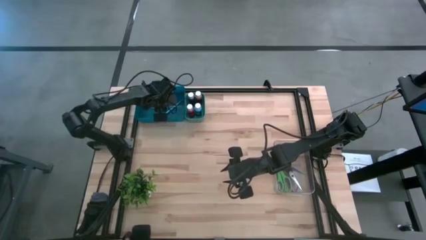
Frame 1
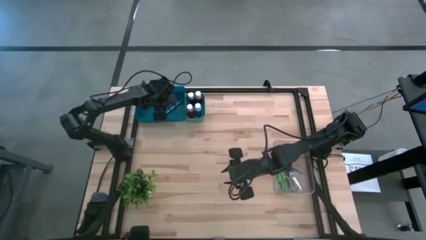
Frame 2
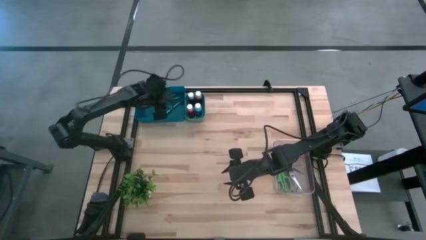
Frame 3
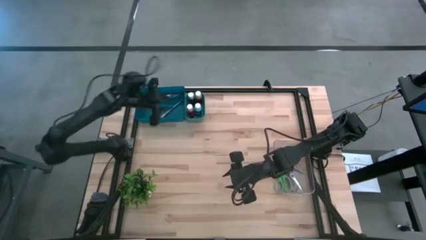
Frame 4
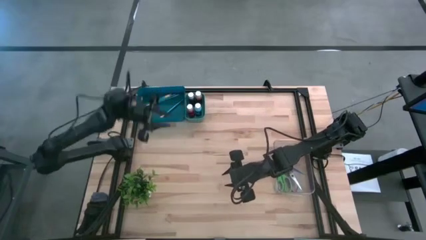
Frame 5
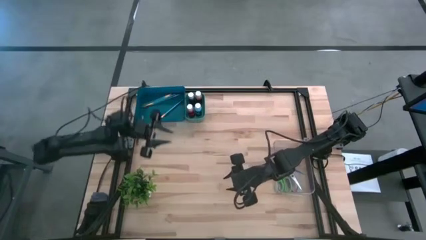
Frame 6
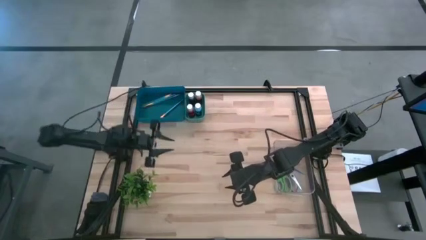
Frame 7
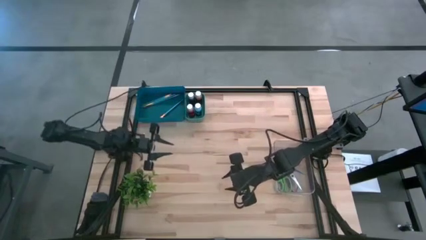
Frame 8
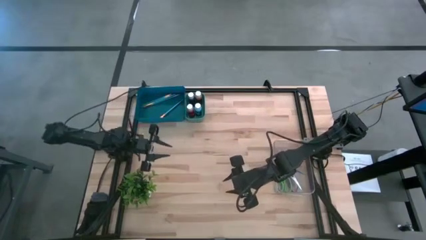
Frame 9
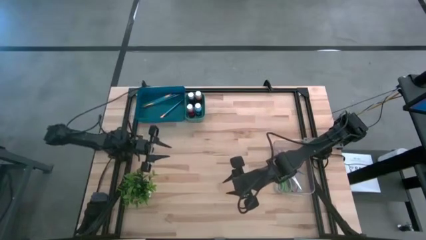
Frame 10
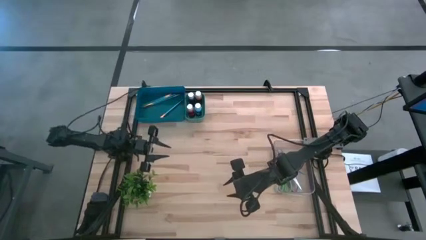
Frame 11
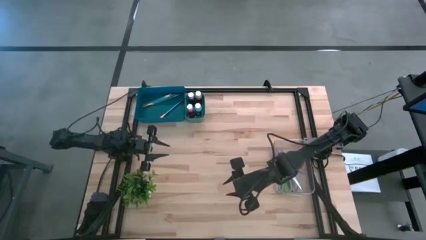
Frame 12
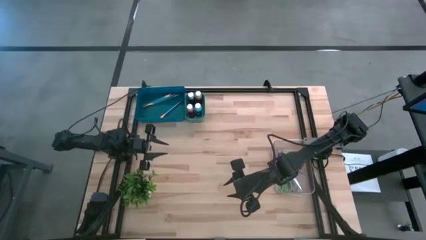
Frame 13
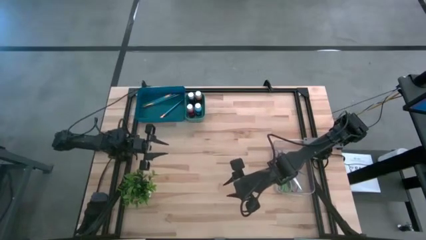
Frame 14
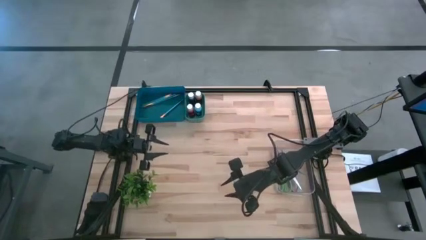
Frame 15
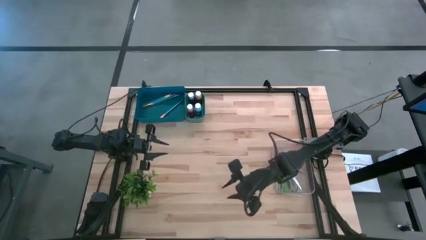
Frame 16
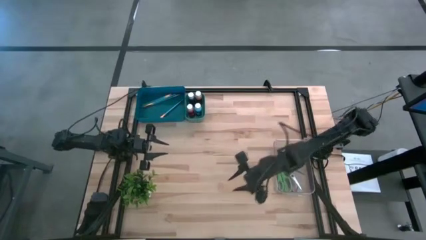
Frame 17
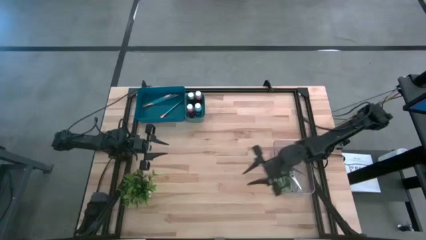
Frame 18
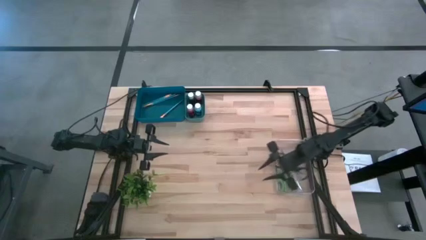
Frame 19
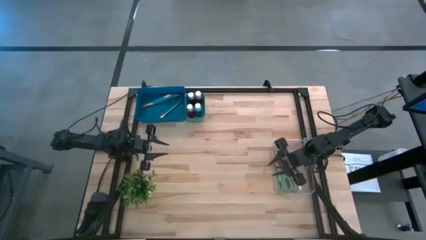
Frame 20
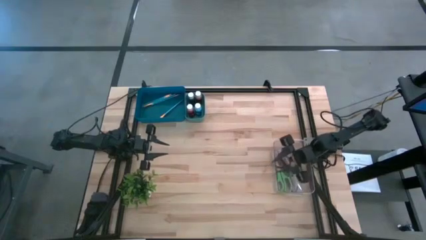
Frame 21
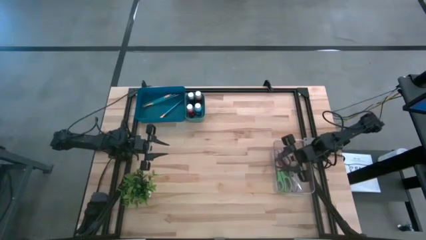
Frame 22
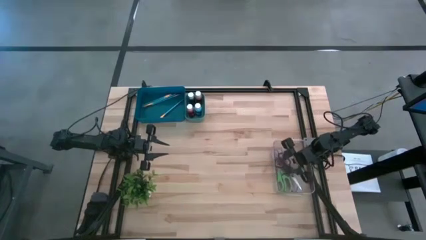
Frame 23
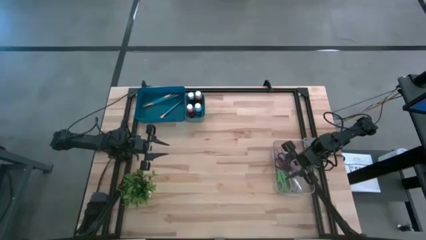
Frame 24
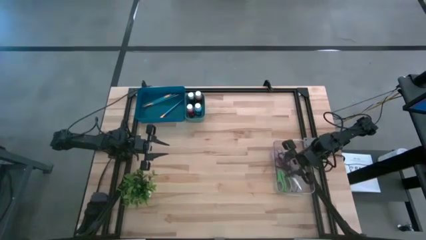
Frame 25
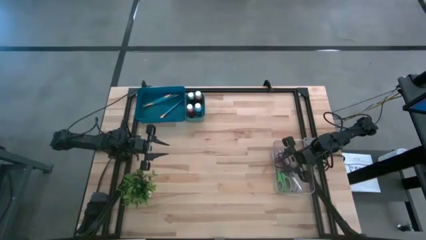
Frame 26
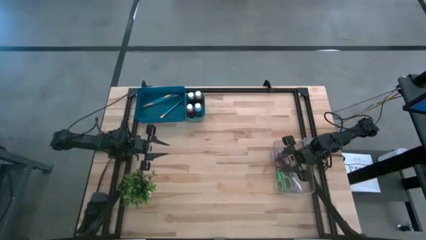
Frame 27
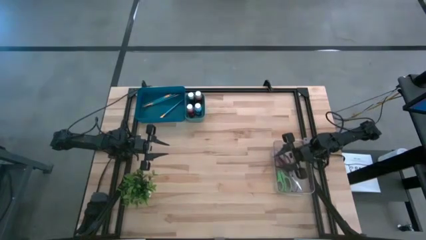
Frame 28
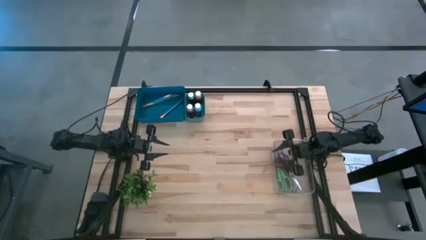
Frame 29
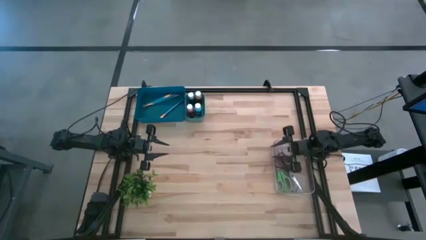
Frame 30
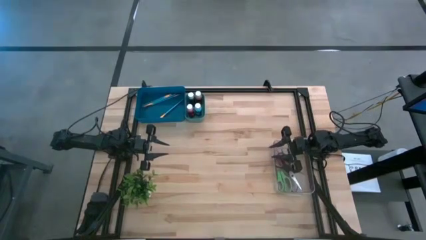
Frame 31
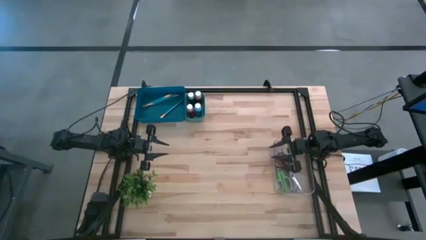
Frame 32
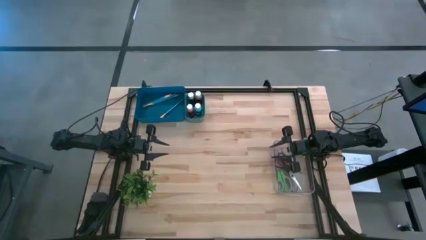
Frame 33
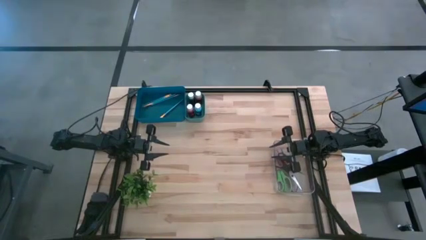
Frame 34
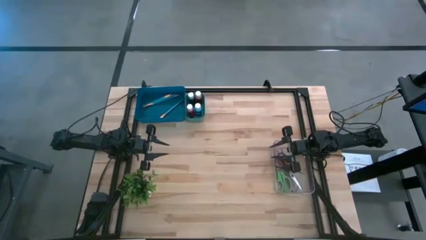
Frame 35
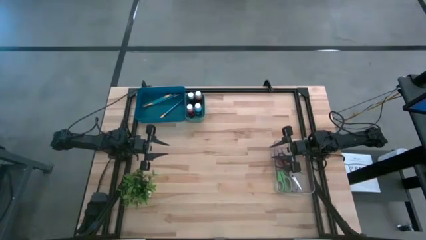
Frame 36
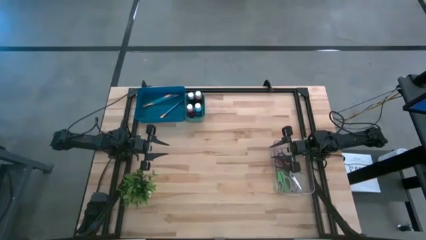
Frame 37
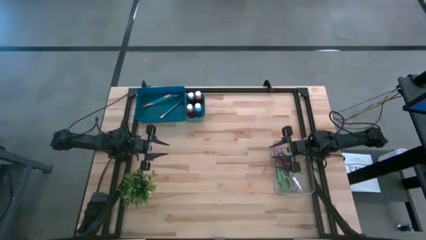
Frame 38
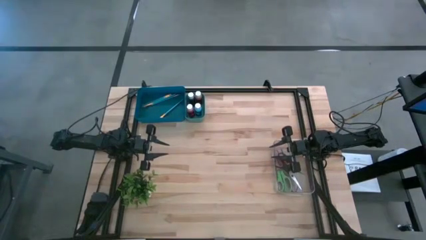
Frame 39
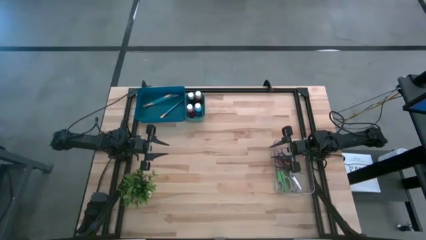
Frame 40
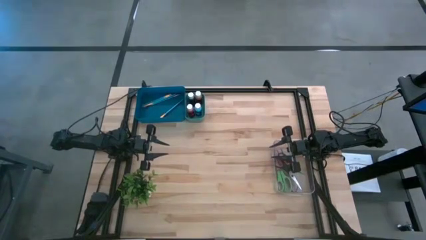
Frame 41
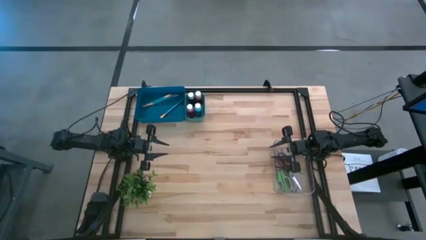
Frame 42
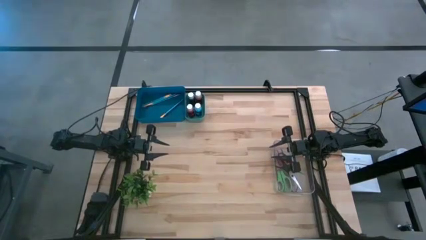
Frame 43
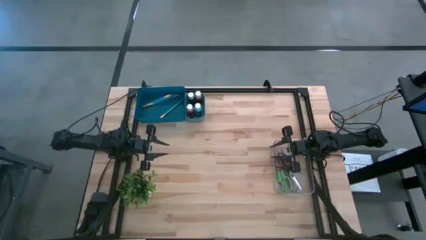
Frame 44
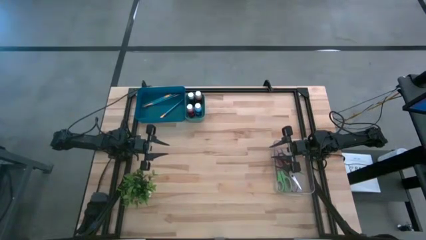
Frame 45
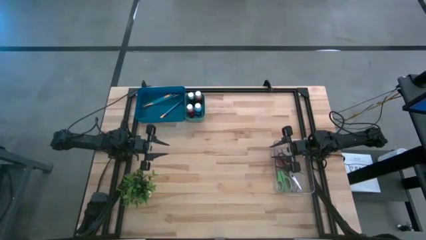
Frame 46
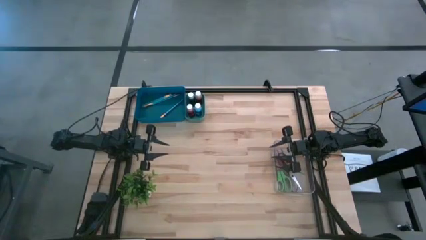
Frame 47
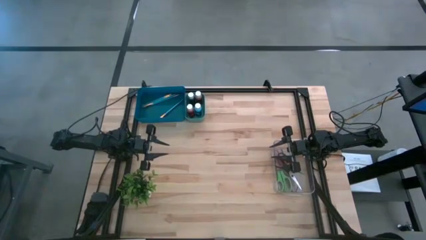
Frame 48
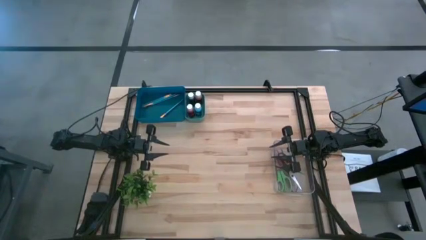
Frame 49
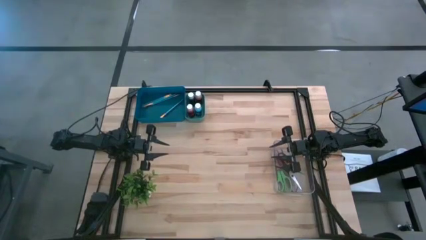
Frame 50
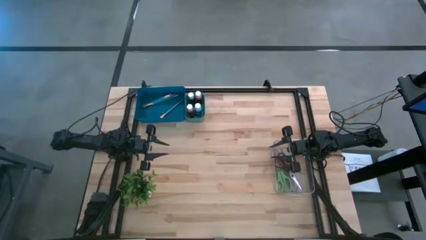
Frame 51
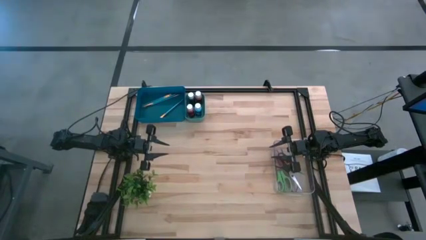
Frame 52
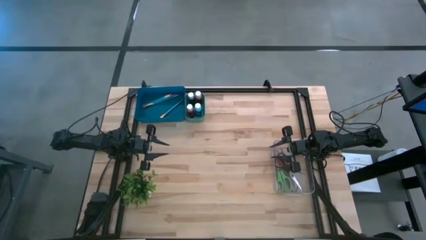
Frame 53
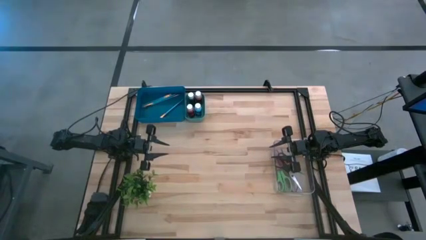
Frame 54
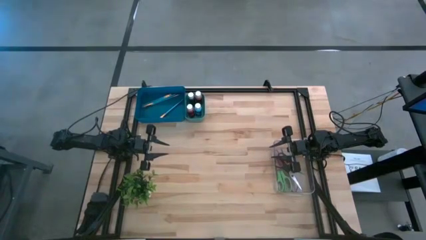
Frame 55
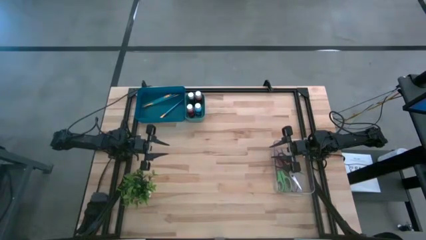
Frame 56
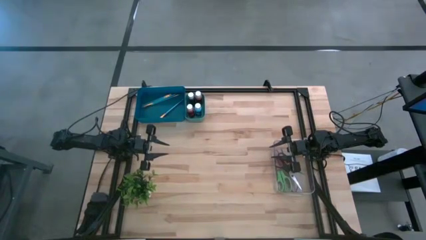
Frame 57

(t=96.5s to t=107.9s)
Task: Pick & Place Paint Supplies
Return to Home Position

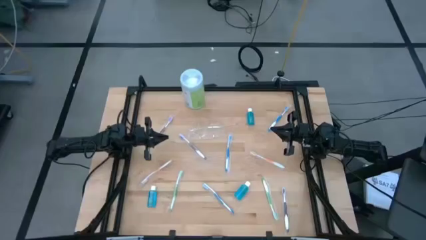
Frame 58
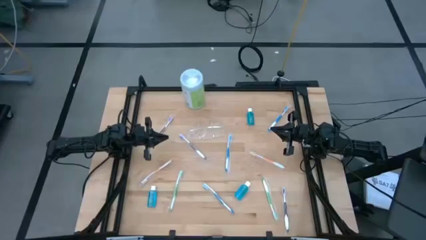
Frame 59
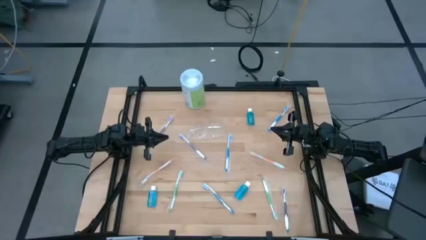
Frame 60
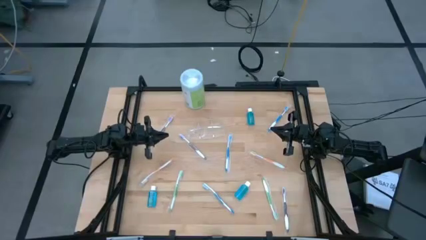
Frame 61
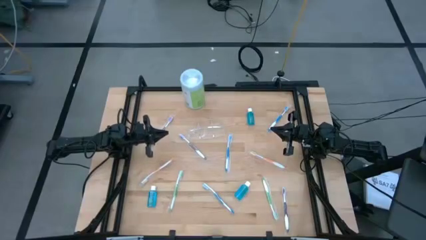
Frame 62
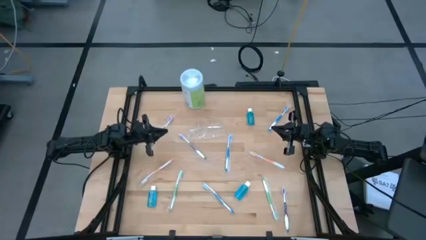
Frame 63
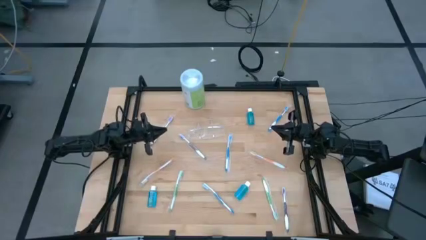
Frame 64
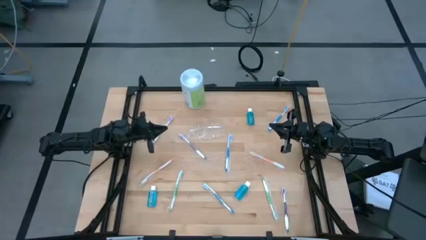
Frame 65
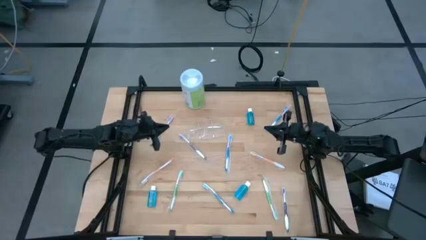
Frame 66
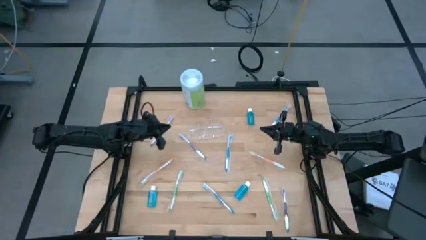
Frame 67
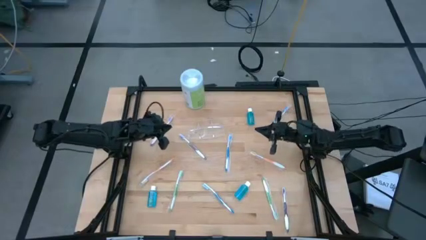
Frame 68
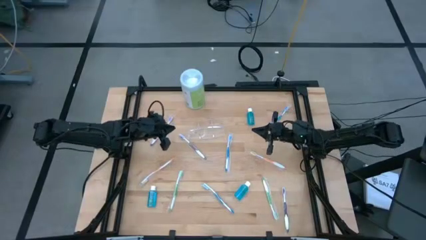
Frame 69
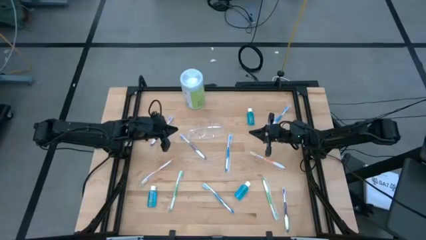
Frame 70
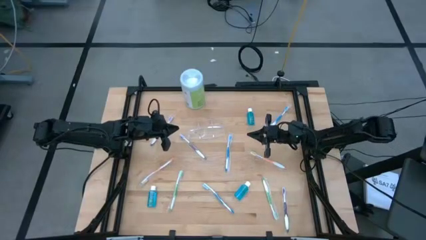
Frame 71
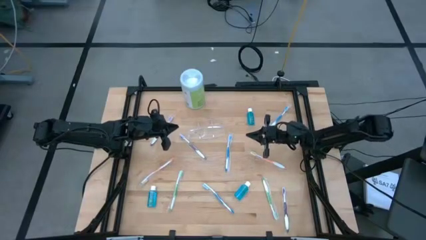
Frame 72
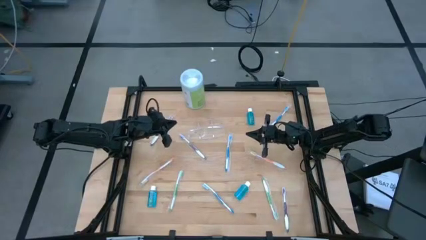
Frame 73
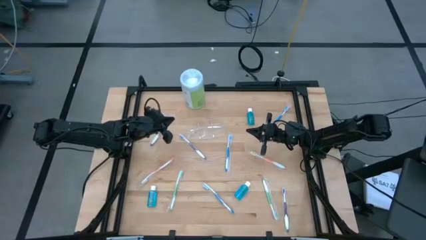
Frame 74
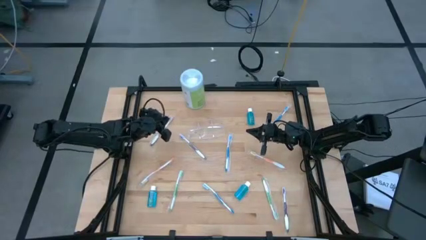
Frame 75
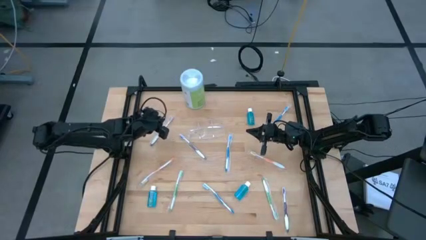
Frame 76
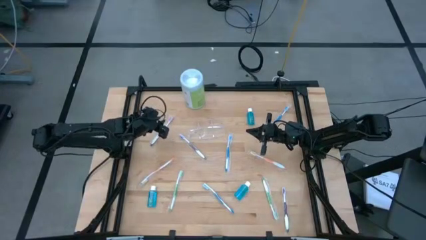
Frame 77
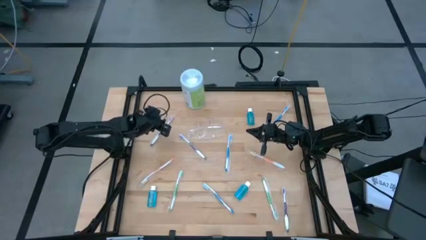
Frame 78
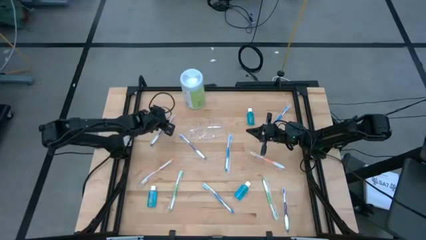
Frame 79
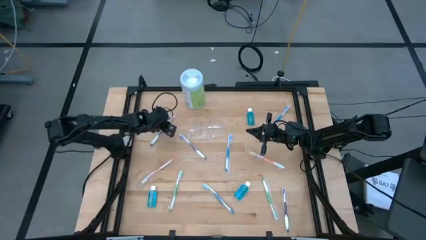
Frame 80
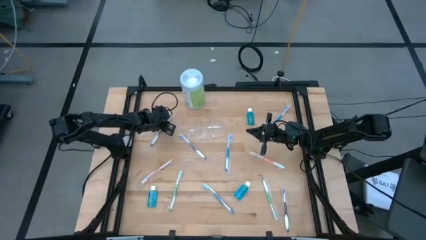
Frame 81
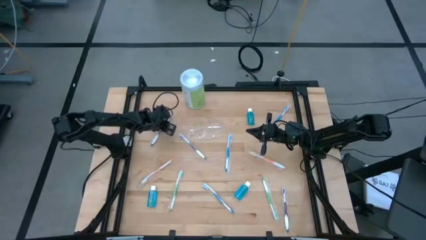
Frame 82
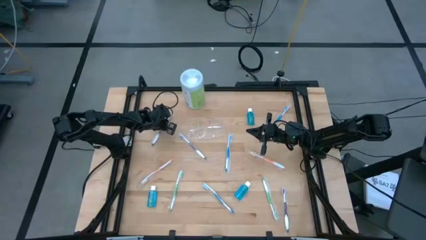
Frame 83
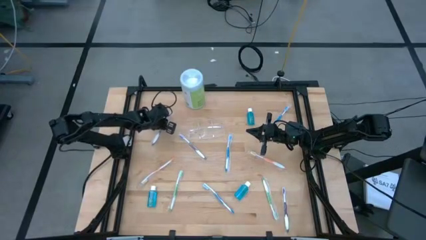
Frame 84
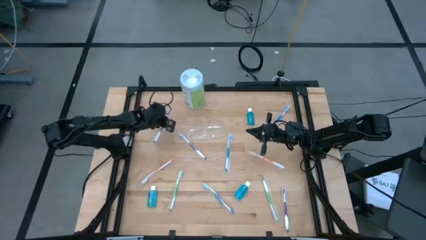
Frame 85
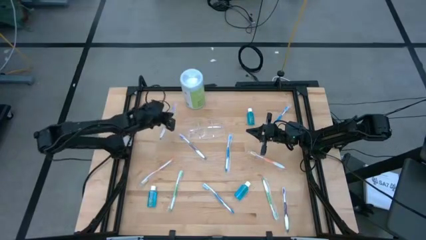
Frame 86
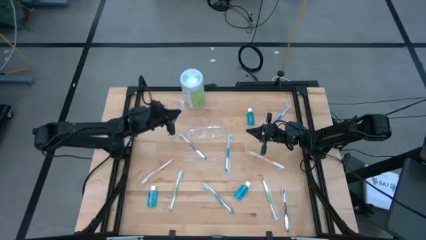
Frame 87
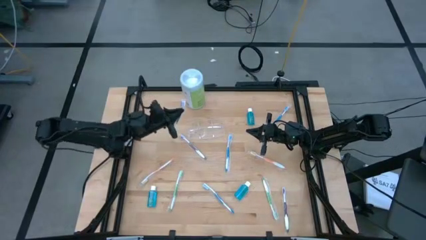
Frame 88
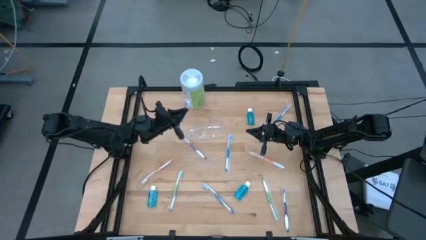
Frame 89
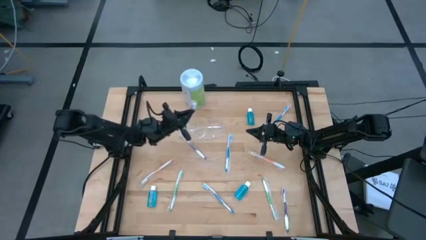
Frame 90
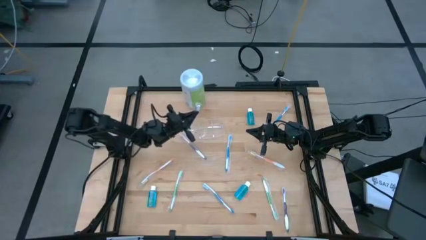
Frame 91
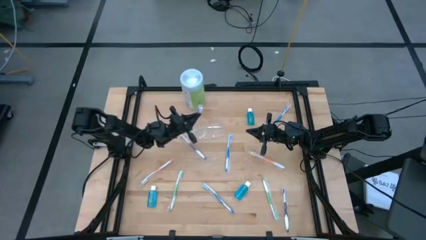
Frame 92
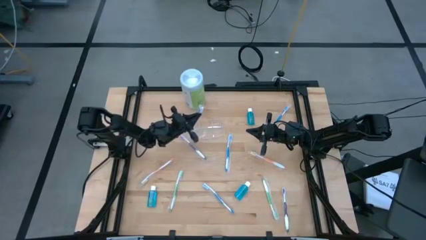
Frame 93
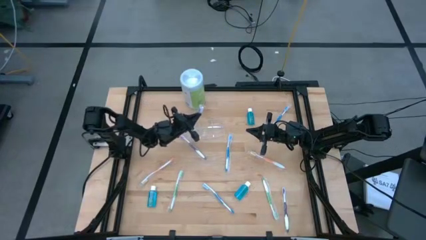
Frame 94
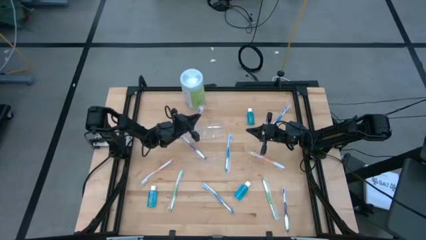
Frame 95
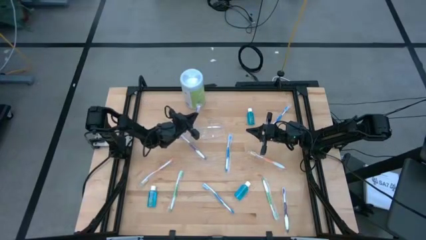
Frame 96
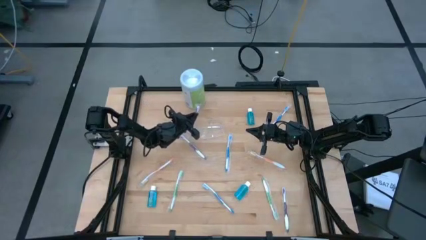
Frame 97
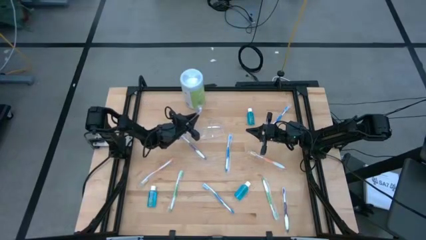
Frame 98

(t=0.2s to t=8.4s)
Task: Pick & Place toothbrushing station
Put the left violet toothbrush into the left side of the transparent organizer
